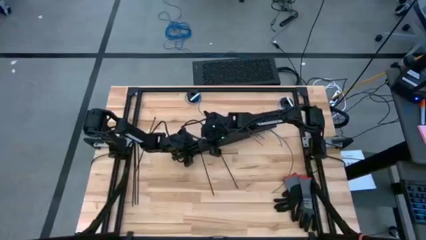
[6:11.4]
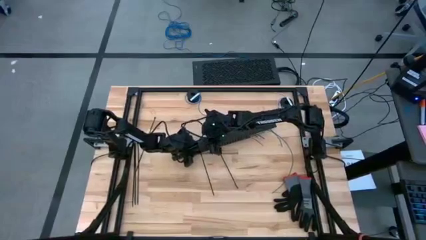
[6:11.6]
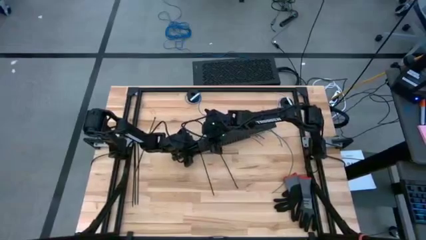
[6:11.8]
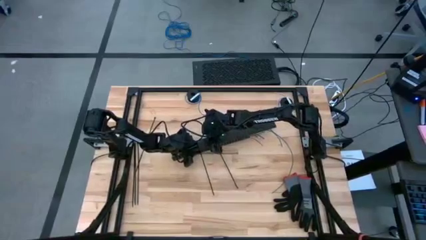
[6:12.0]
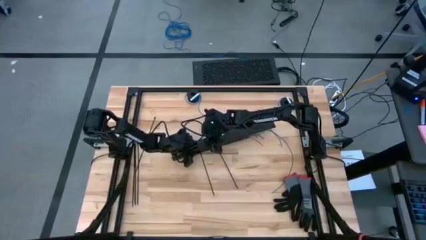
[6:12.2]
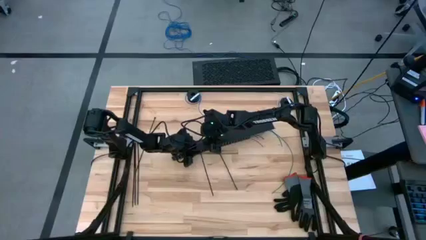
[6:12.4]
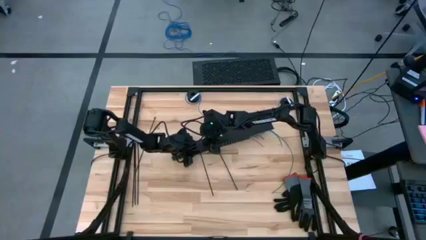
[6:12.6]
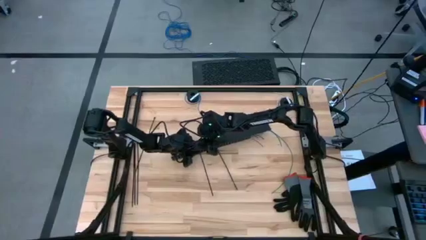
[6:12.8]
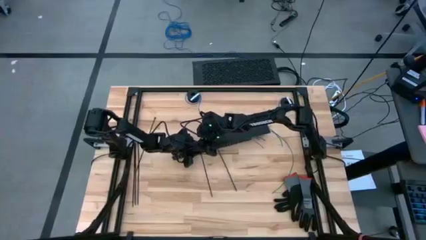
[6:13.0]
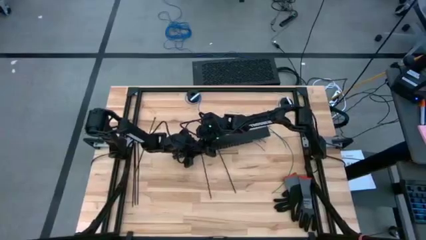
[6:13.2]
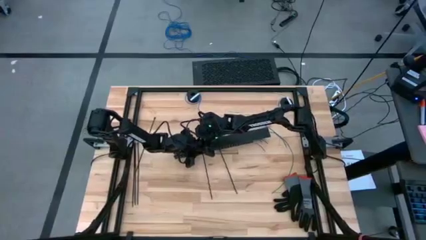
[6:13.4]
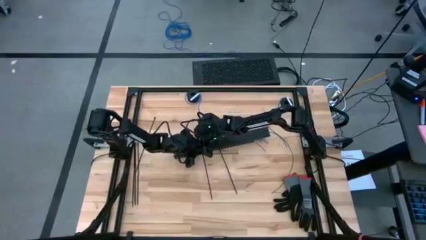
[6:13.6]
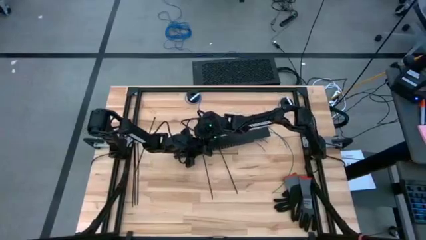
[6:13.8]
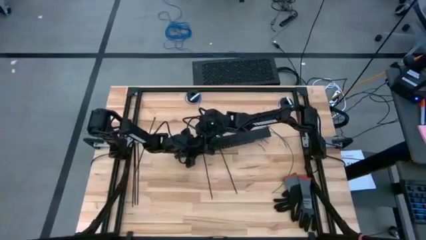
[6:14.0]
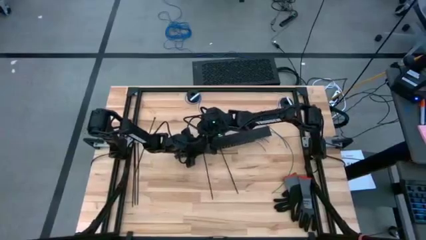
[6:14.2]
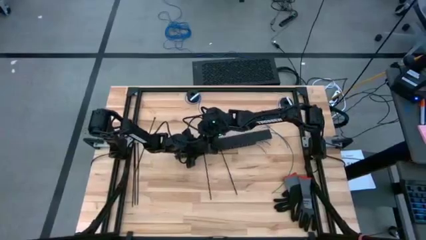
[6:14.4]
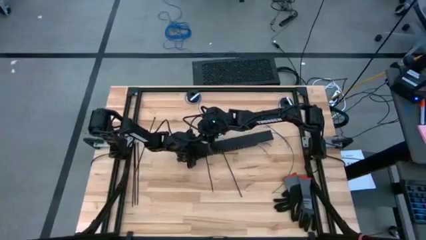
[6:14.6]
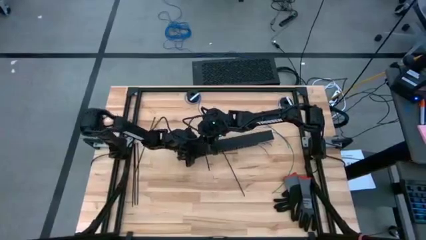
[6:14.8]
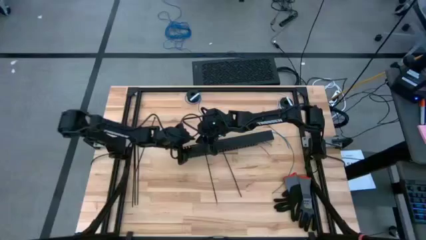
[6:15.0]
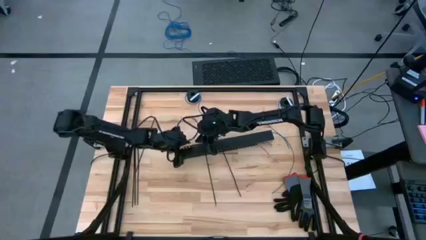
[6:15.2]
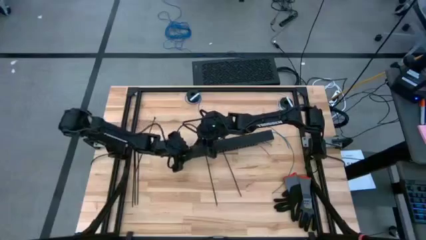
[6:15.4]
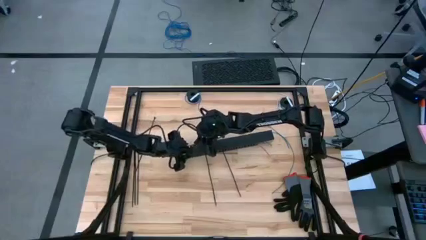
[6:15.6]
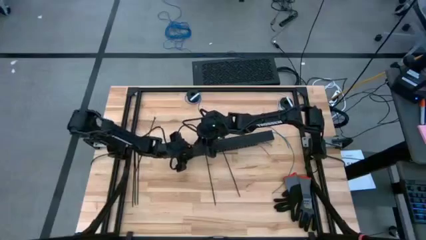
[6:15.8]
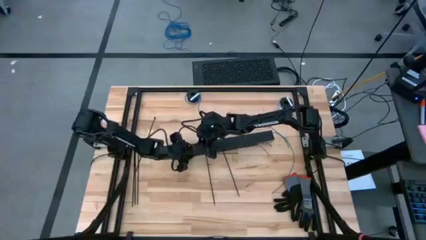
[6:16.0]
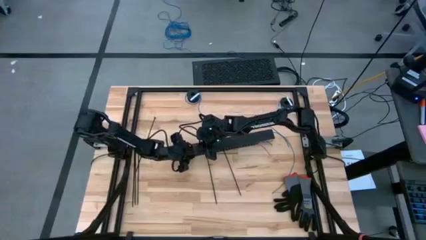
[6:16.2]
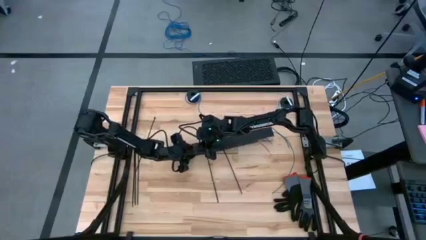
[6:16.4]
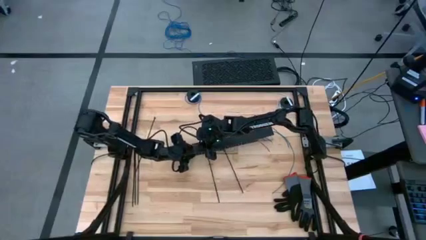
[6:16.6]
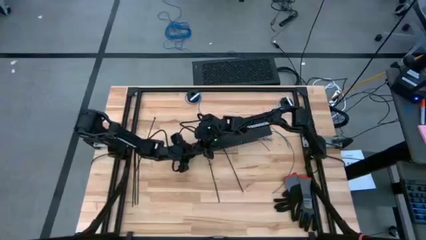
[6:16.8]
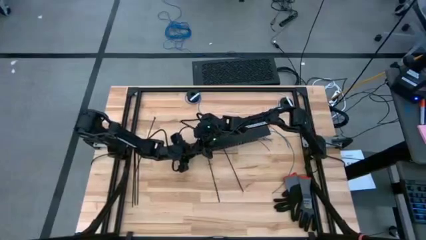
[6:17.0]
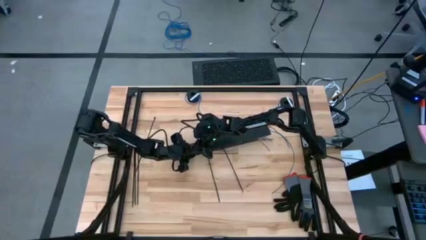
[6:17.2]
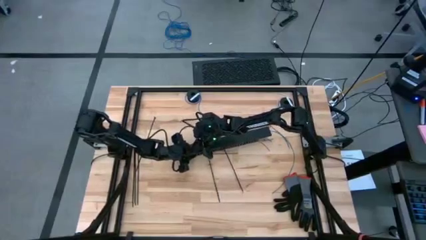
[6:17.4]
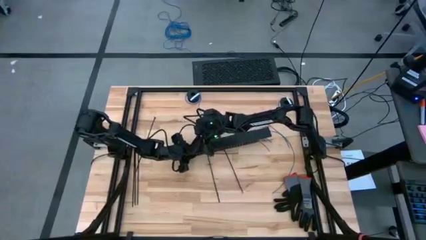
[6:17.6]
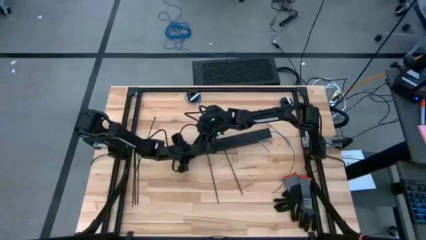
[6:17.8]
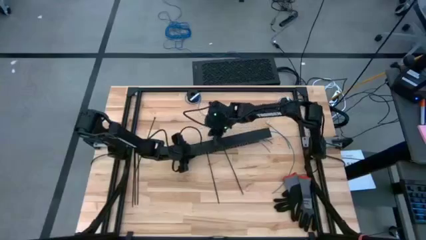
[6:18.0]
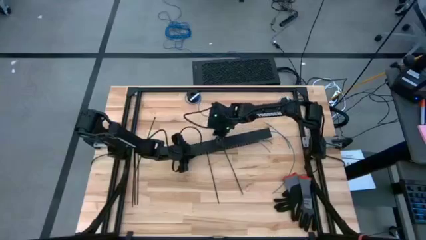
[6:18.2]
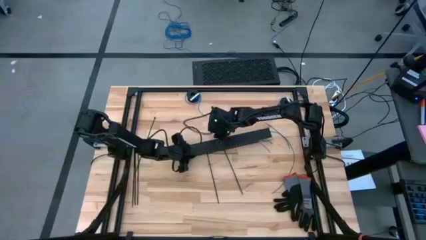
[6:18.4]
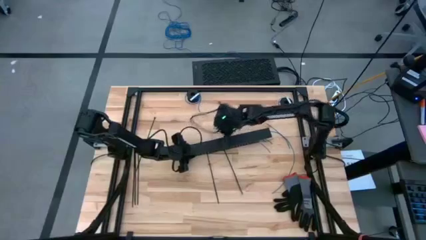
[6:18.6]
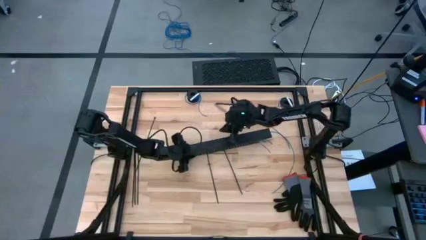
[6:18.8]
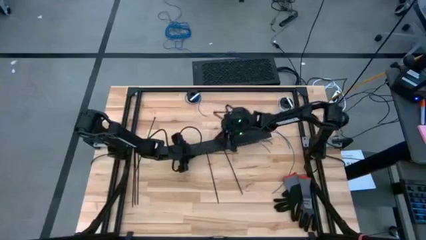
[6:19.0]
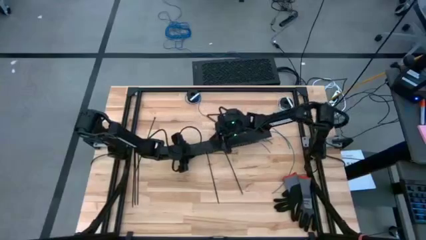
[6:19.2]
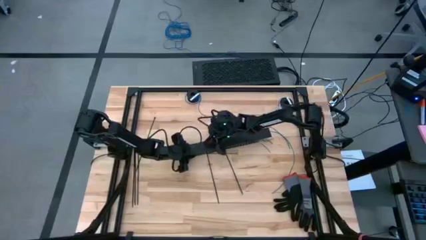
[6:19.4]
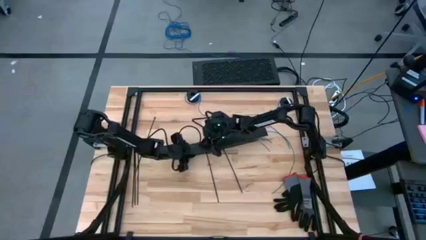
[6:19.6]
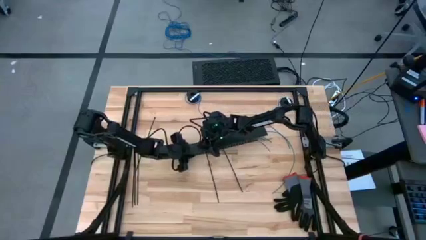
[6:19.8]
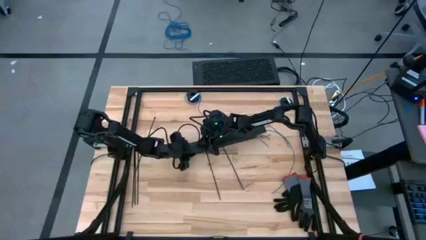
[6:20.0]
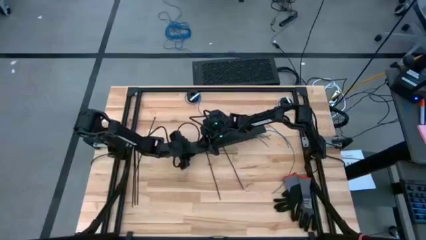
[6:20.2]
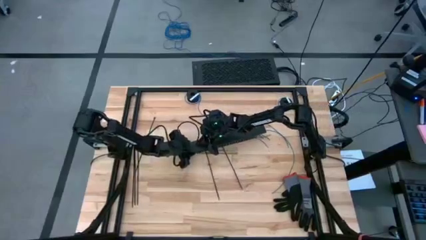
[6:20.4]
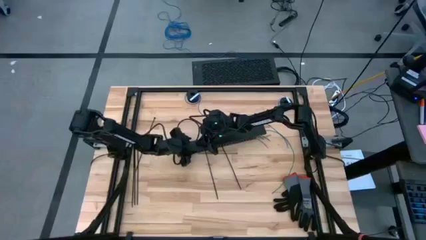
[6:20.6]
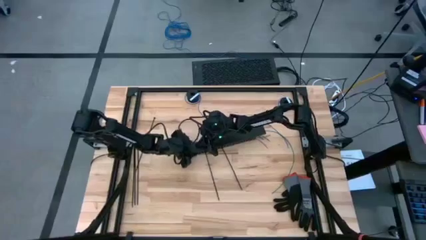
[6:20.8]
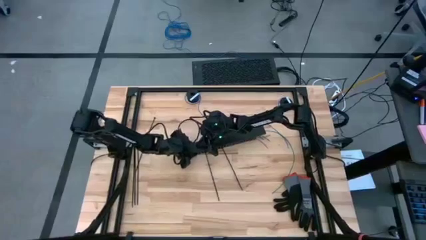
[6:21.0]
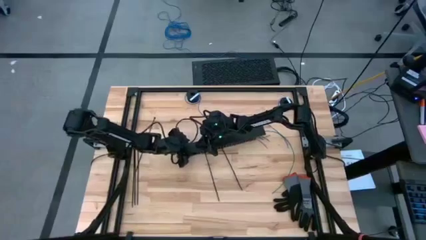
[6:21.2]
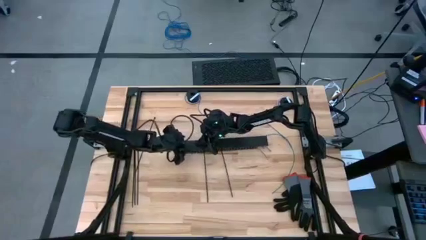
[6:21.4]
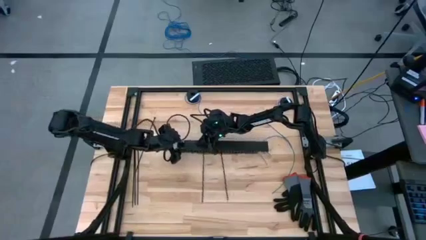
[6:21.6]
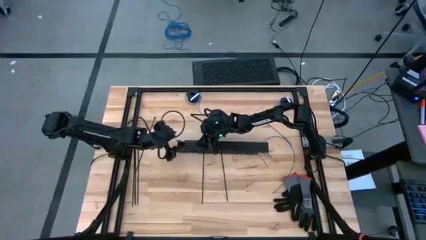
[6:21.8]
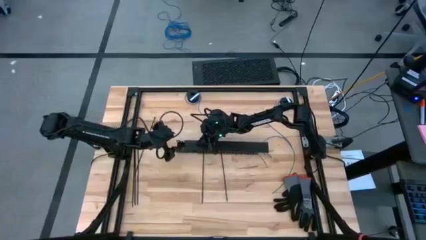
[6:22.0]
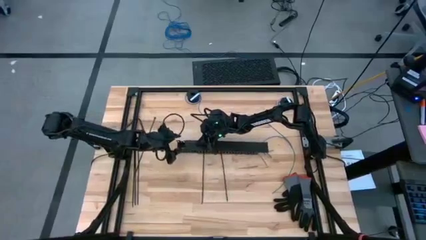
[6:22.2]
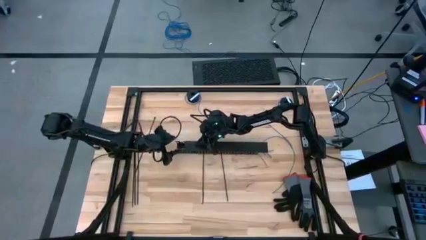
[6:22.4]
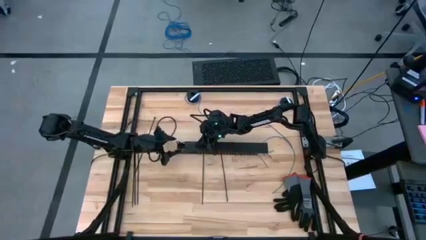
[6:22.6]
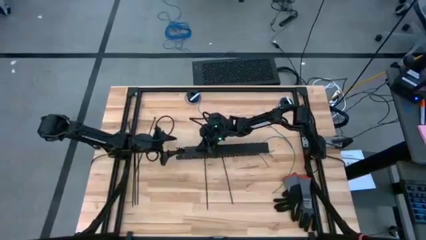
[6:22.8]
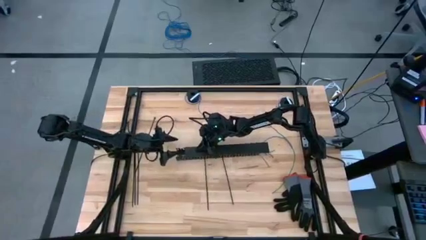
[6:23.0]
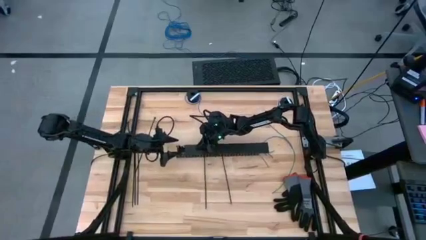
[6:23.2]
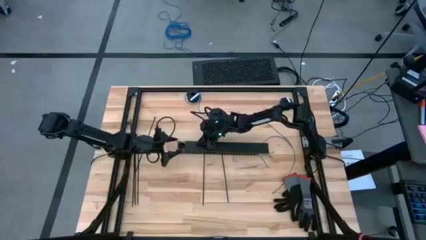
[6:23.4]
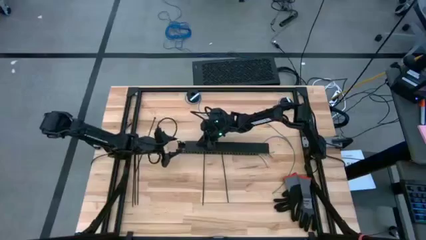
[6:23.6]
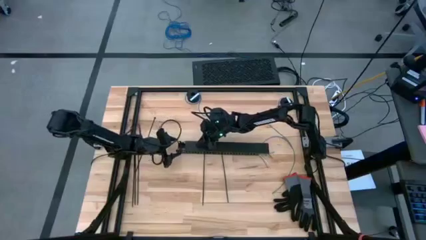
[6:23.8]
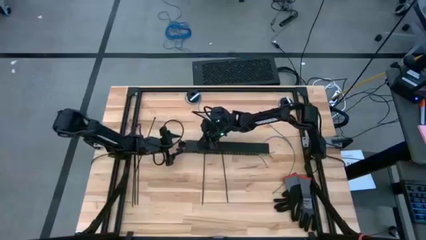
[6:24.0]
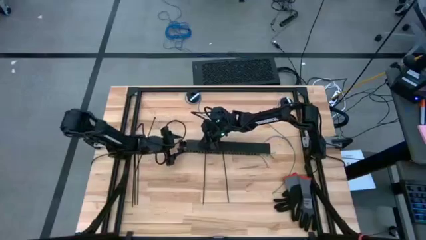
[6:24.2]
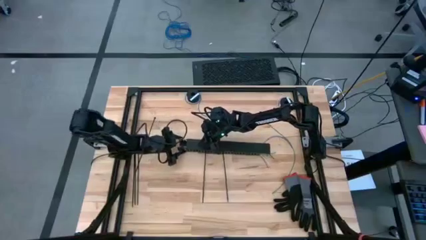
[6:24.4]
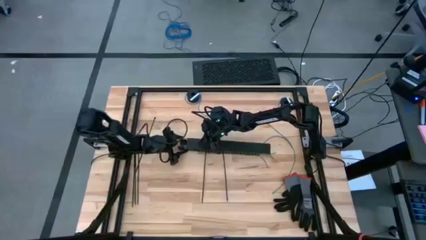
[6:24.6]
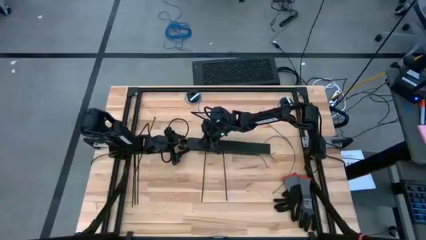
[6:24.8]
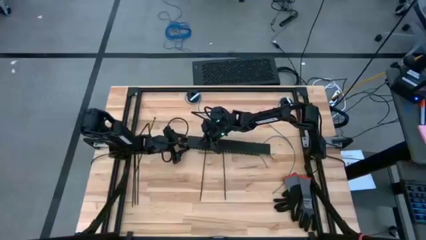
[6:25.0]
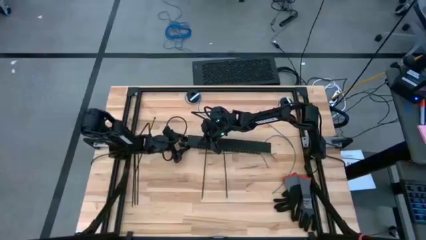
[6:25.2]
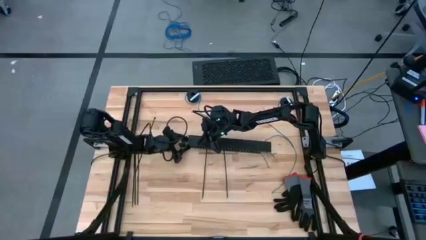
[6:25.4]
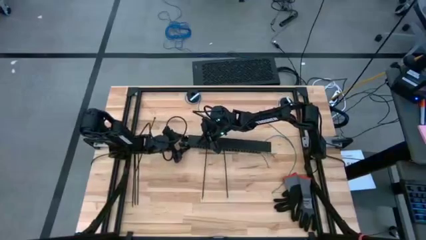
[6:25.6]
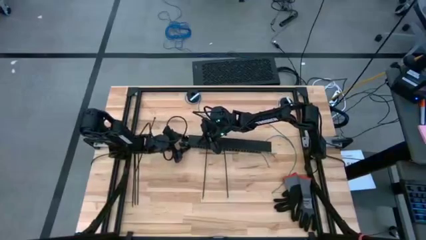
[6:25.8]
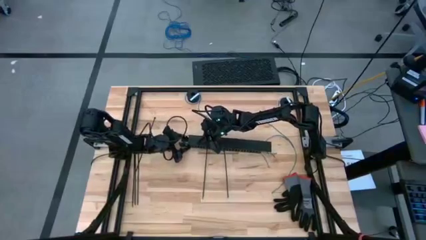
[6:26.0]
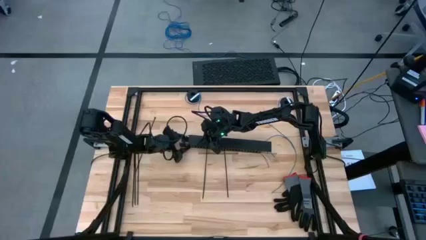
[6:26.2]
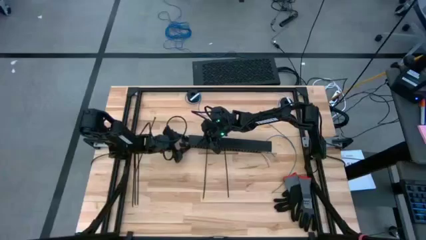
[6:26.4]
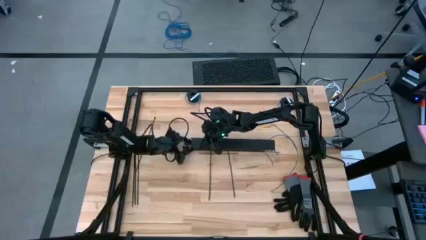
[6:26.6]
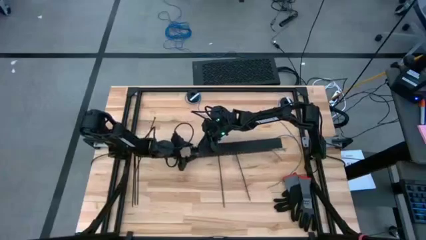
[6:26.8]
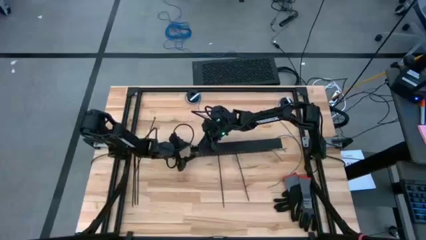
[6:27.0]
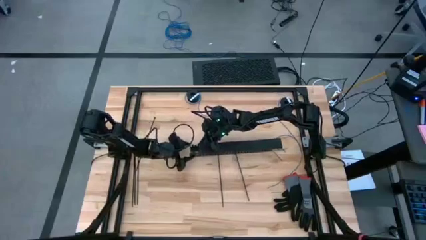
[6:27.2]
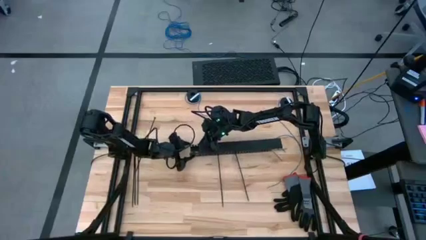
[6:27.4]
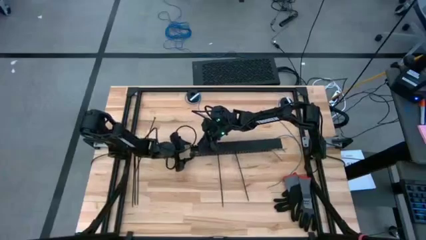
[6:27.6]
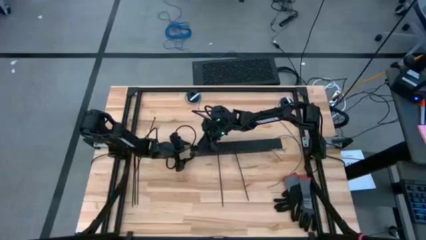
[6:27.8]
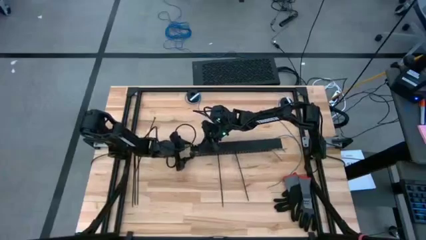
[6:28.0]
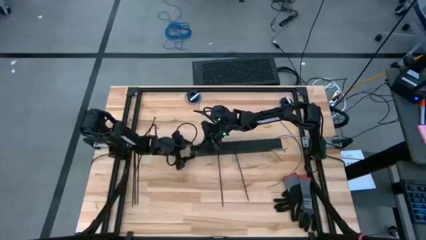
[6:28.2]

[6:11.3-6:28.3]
Task: Ziptie cables
Close the black cable duct
